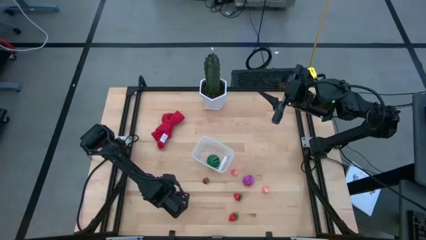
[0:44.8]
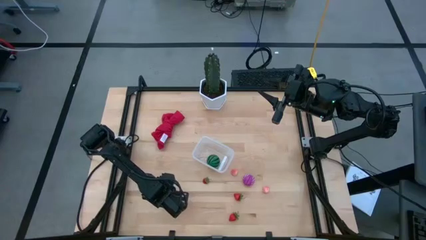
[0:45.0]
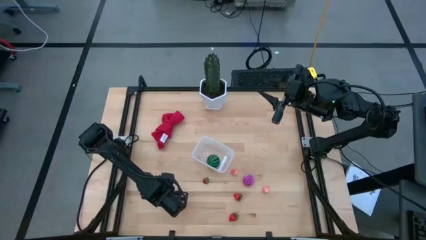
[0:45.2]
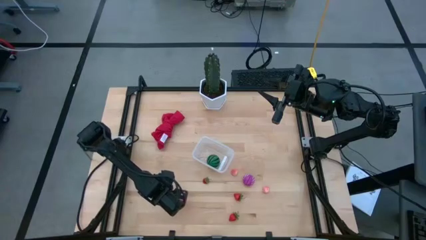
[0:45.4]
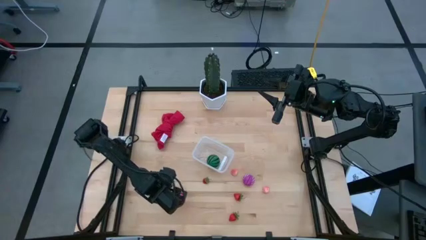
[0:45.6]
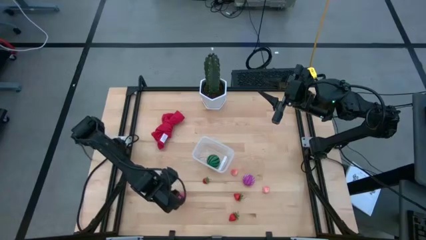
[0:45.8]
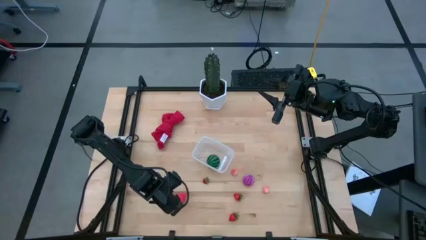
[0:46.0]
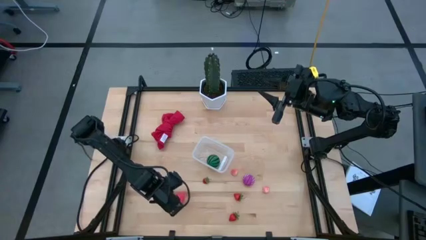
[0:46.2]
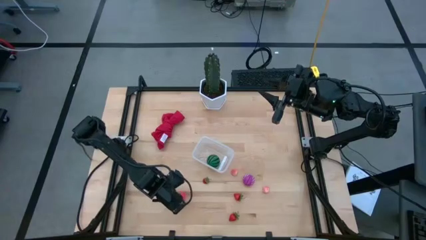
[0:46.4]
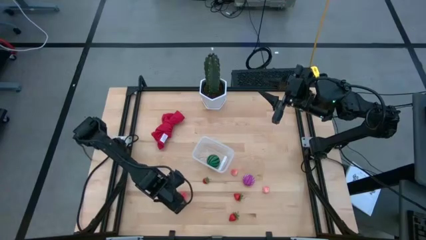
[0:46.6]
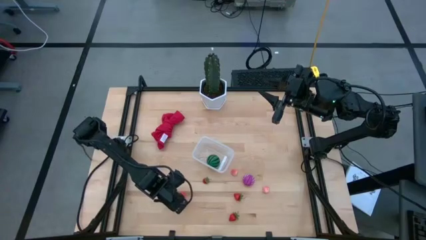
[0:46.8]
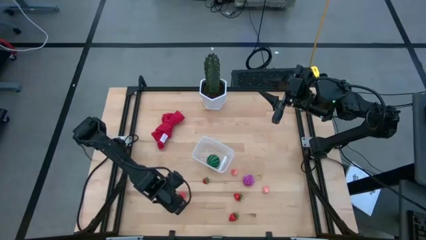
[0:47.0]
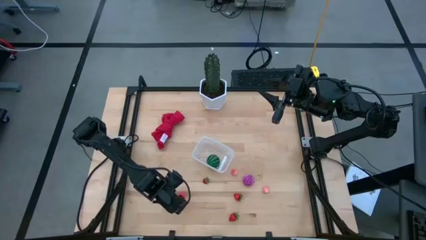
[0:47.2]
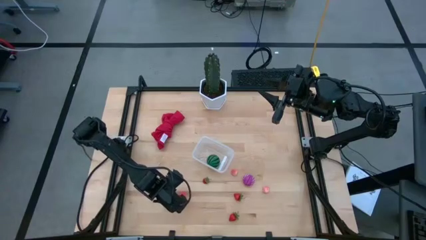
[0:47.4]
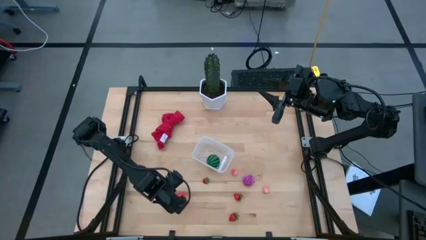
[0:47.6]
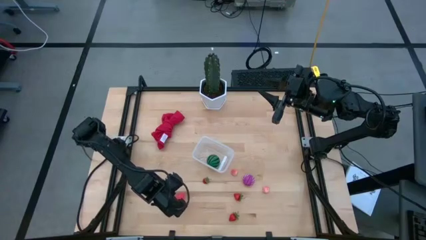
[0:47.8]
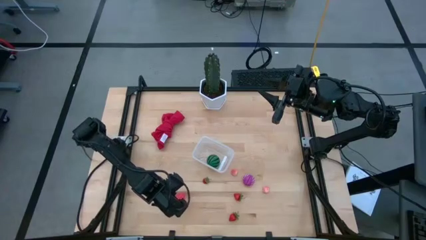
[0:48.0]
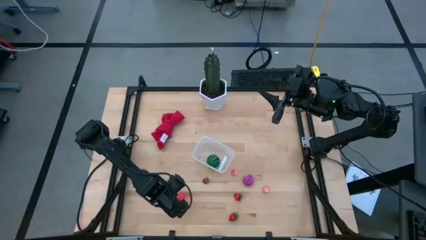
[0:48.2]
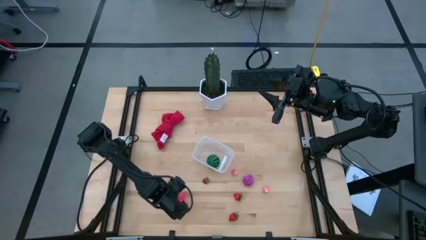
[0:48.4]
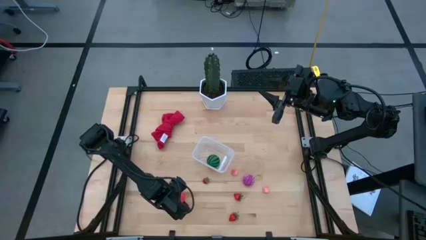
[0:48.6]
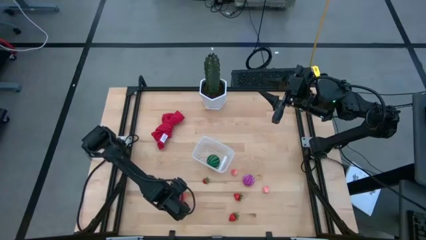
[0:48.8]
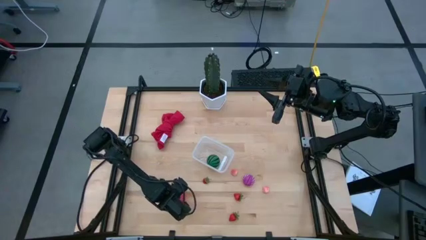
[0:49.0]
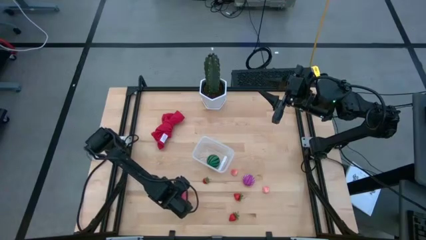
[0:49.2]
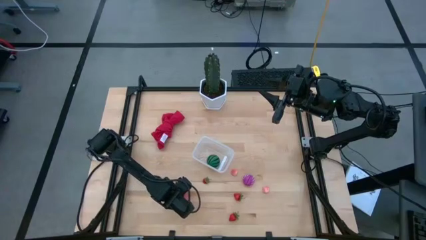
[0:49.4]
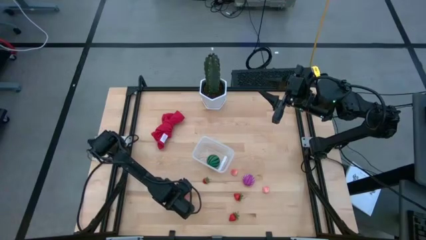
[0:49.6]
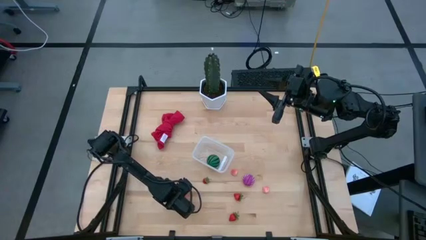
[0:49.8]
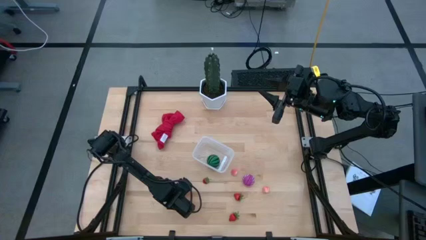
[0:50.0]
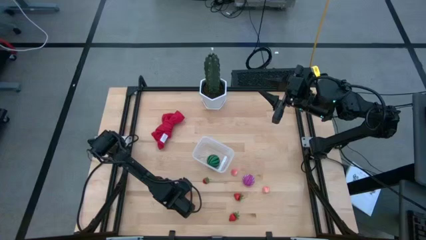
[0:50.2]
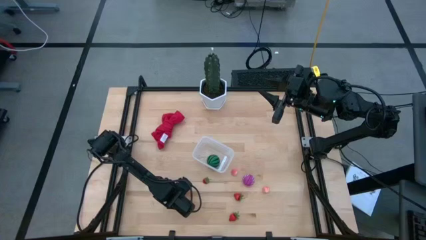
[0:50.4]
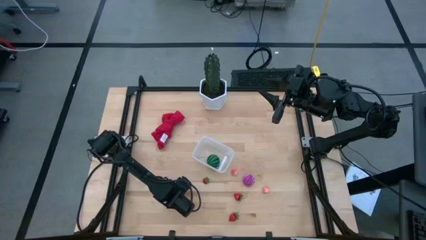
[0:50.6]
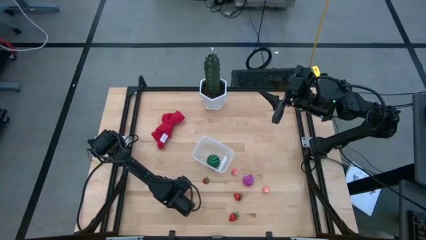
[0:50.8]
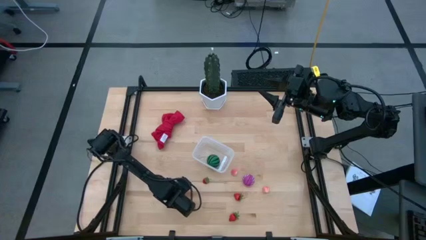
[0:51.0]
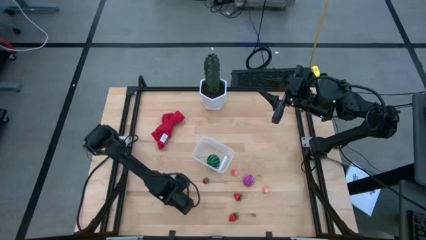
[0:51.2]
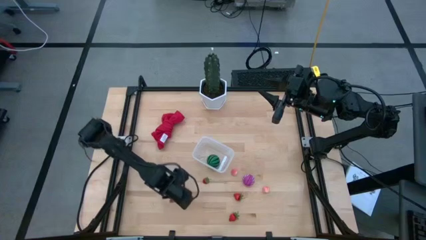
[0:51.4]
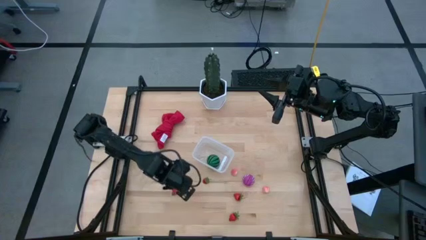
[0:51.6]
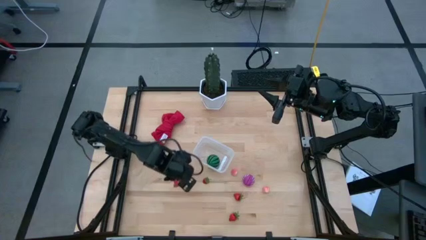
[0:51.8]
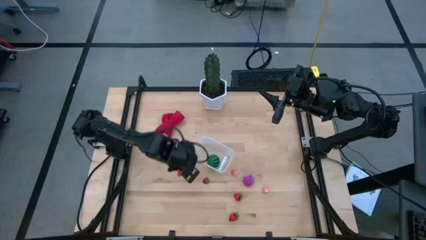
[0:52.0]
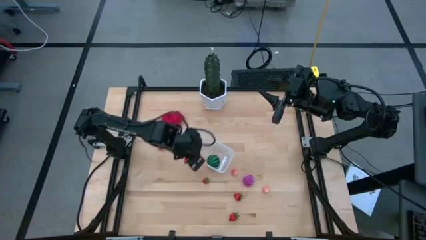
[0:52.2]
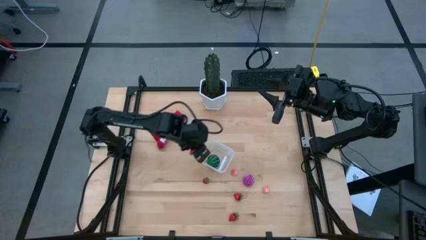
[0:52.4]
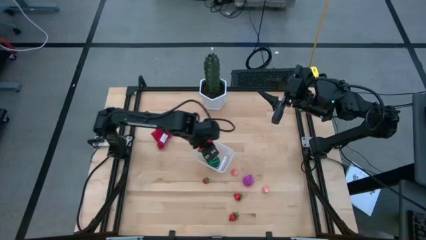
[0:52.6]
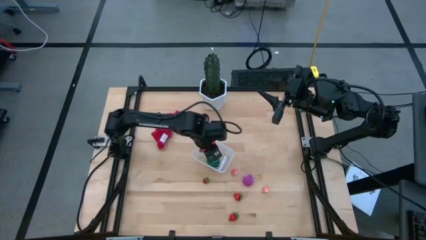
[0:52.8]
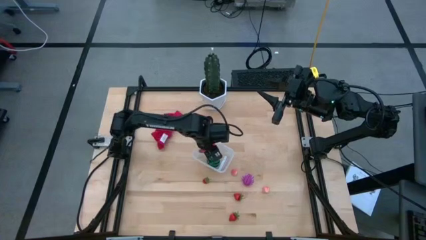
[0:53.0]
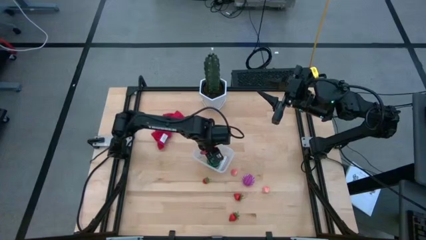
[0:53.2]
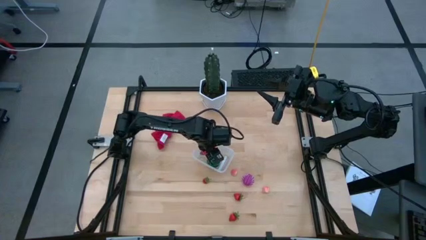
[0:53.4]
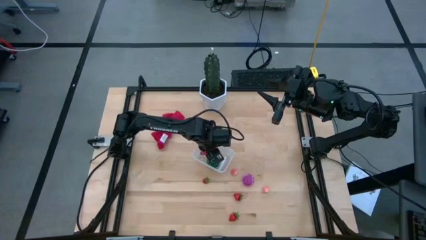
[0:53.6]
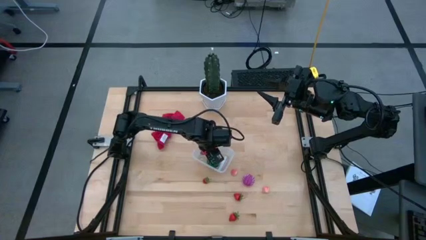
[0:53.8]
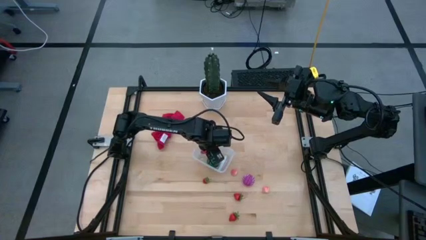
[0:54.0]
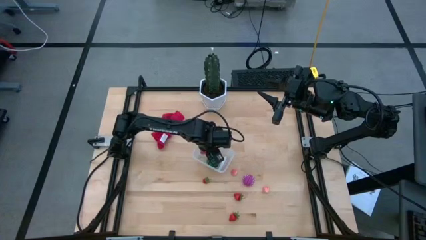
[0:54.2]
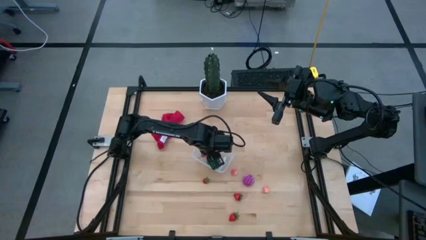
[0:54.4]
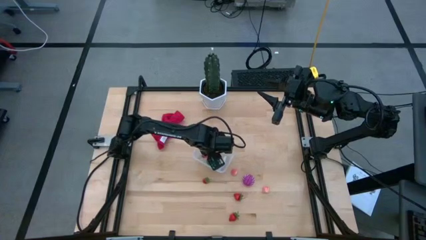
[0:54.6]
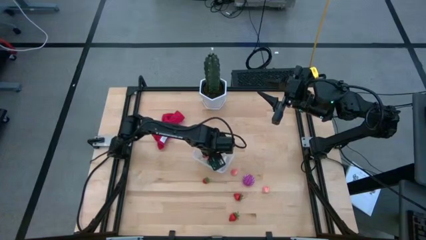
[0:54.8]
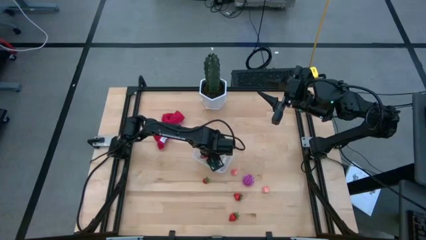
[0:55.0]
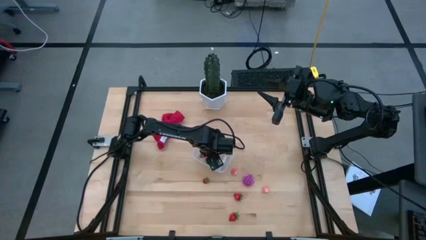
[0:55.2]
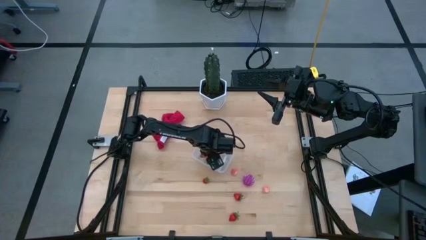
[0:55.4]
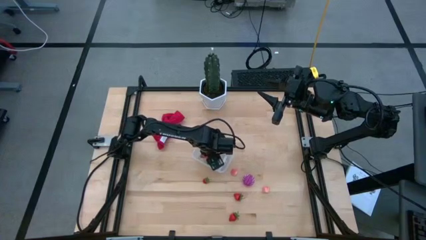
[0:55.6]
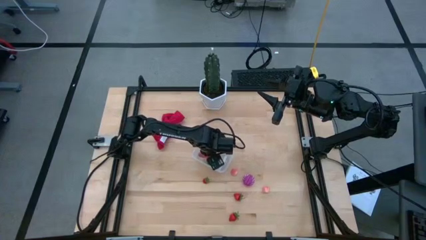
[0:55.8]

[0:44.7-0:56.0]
Task: Pick and placing Produce into tupperware
Put the pink dragon fruit into the transparent container

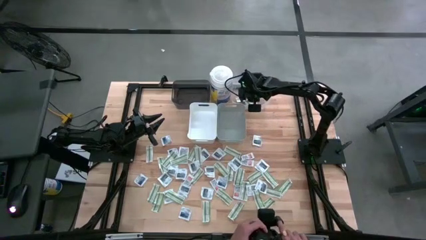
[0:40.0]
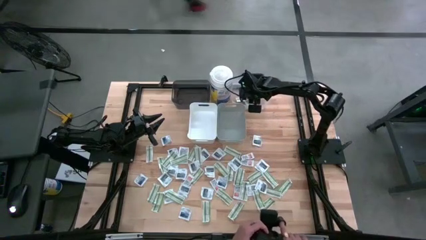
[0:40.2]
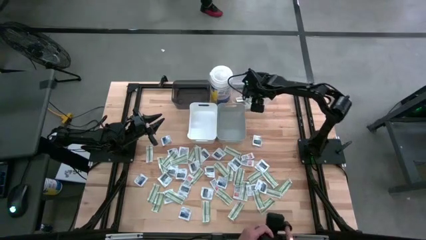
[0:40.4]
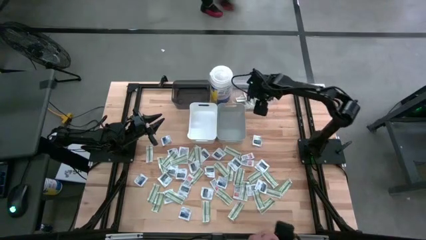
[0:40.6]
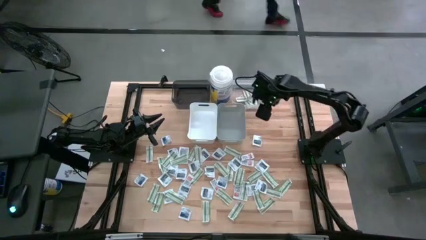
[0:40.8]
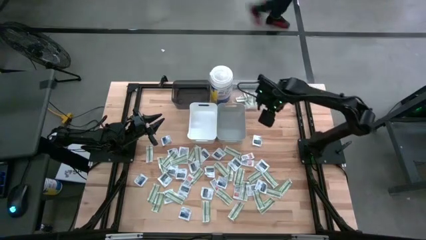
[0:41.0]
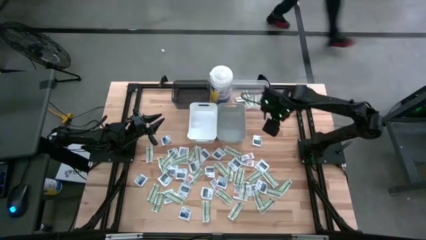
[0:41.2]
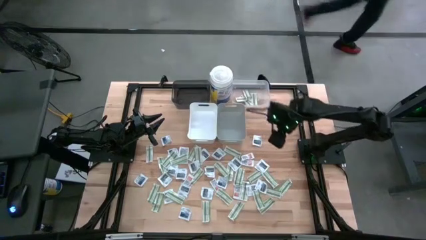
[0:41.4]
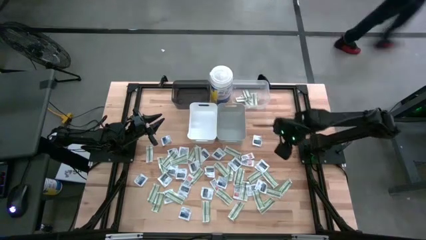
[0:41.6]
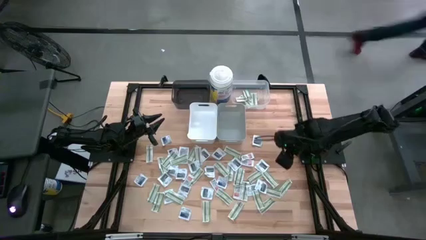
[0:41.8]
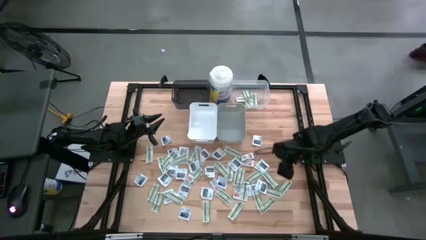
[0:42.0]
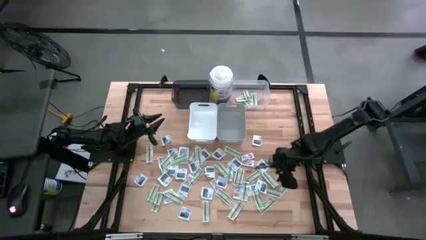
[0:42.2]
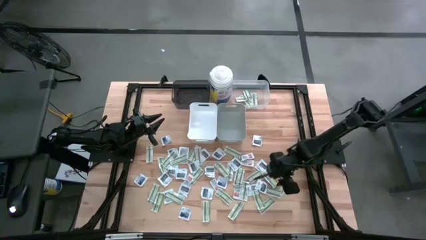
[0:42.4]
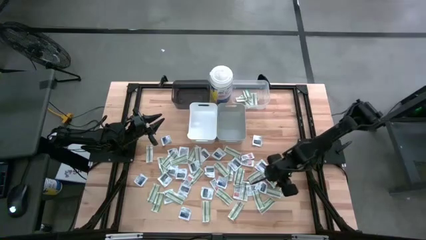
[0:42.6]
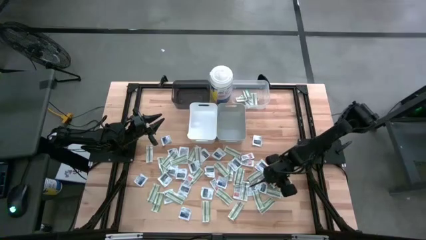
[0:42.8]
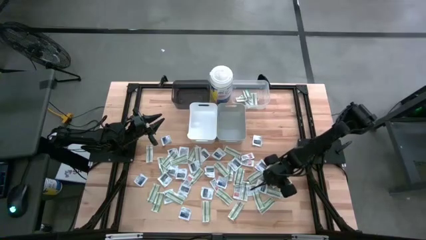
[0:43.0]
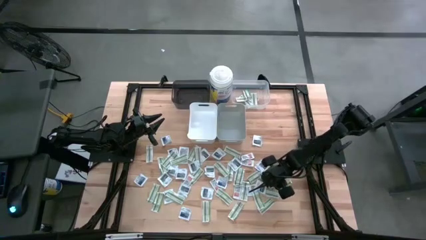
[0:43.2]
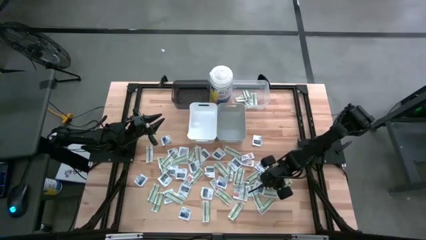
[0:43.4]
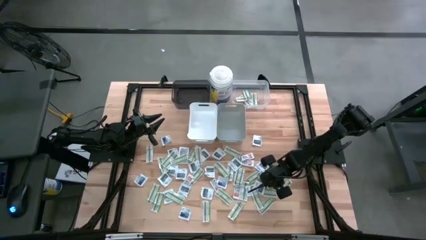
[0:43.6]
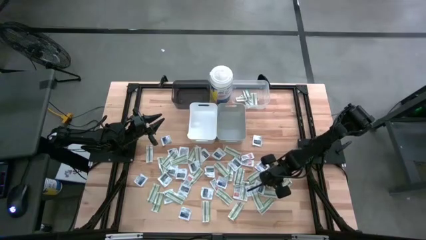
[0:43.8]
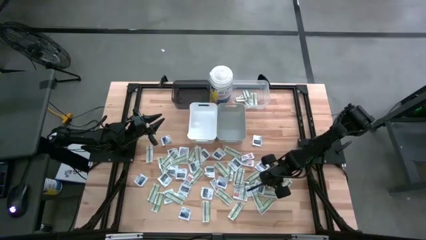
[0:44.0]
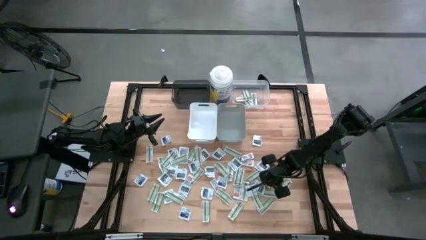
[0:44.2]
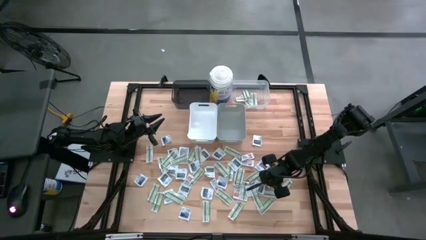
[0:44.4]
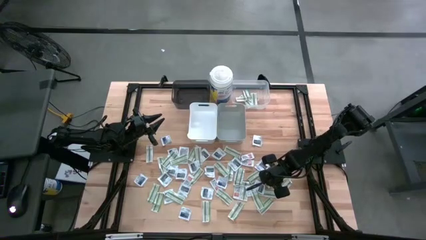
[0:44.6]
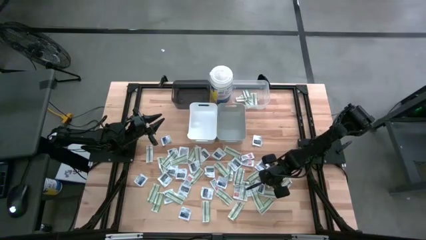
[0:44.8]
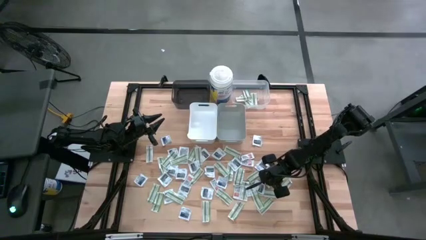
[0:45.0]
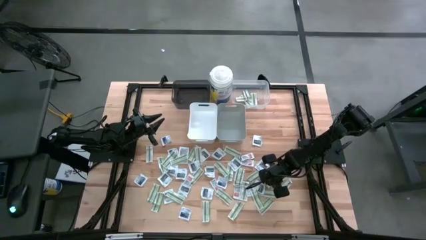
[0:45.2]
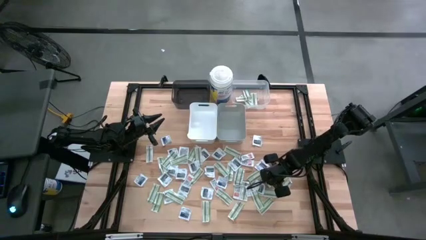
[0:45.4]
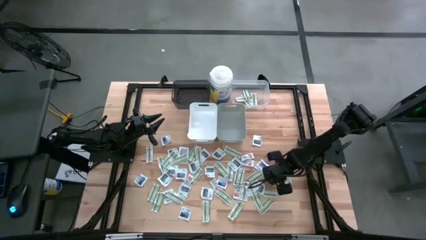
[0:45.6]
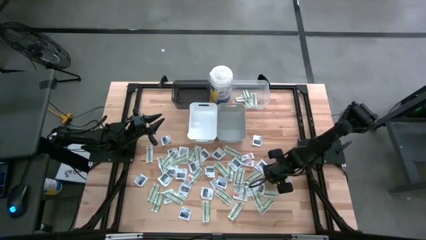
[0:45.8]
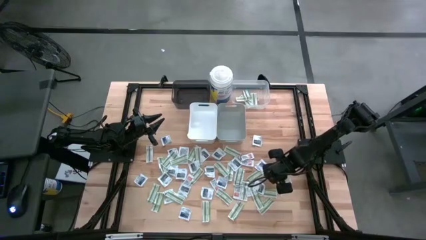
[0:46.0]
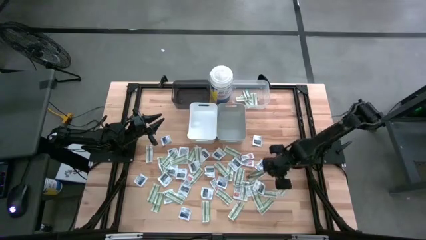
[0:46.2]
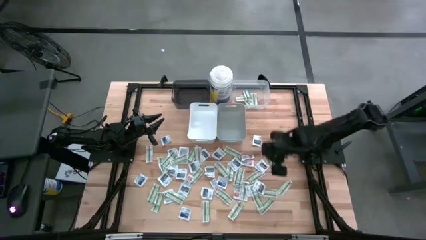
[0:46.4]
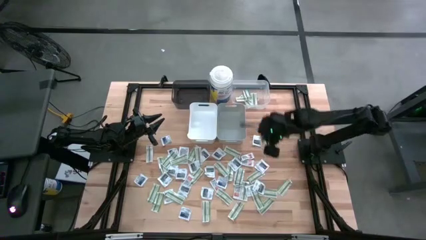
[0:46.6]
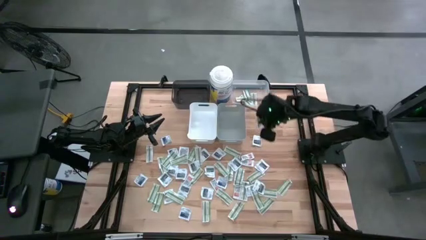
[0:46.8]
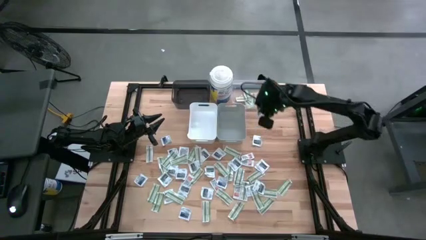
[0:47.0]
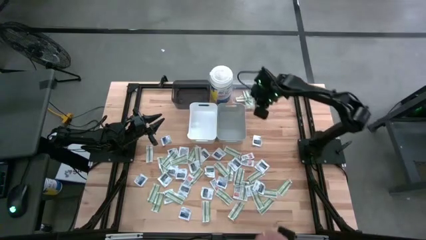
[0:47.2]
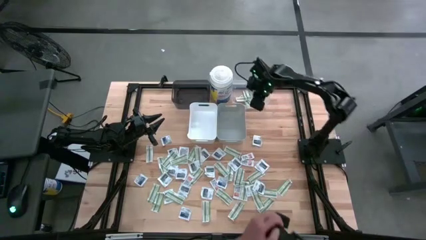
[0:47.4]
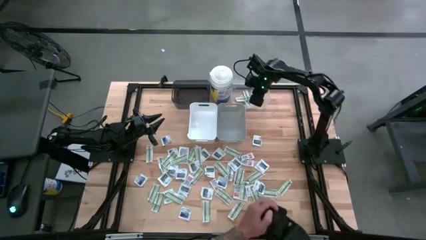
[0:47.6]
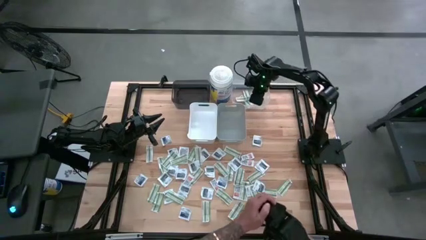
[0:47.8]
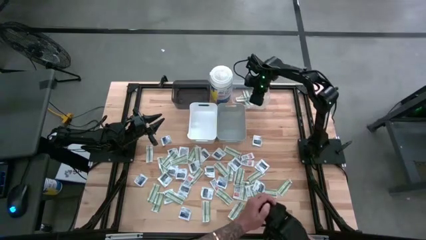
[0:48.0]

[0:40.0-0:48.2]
Task: Pick & Place First Aid Supplies
Put the band aid into the transparent bin
